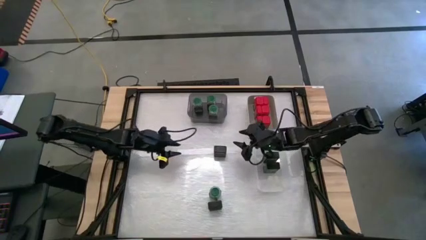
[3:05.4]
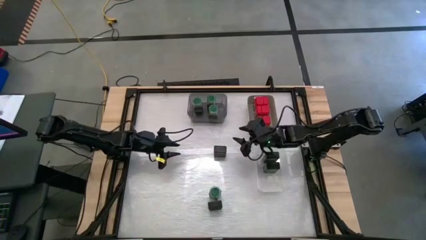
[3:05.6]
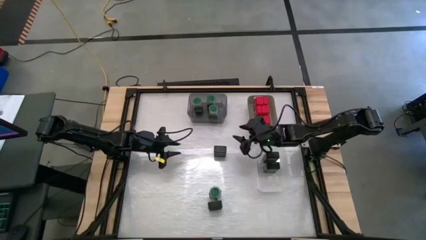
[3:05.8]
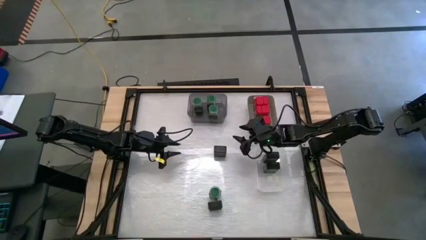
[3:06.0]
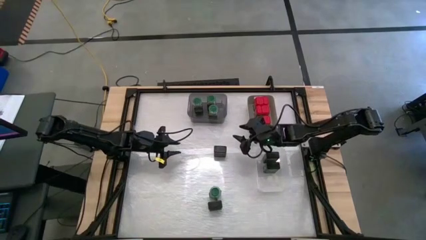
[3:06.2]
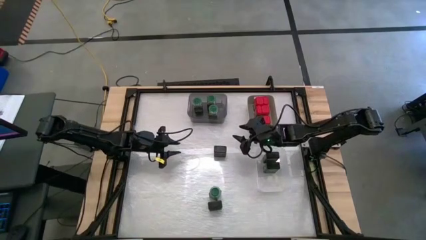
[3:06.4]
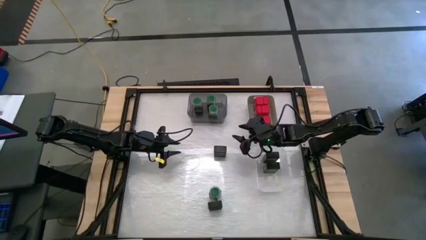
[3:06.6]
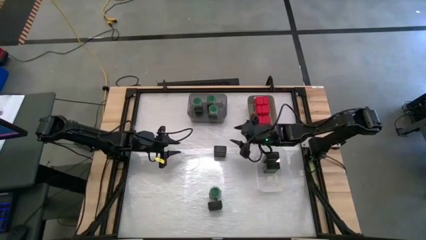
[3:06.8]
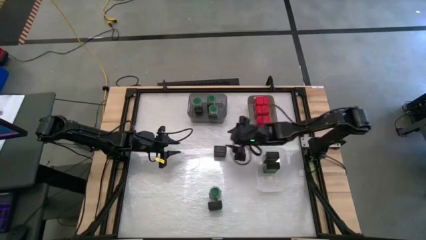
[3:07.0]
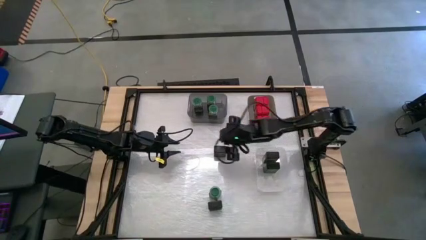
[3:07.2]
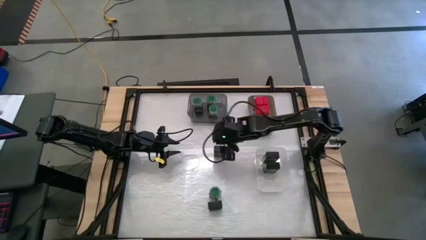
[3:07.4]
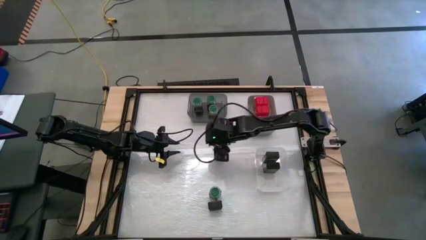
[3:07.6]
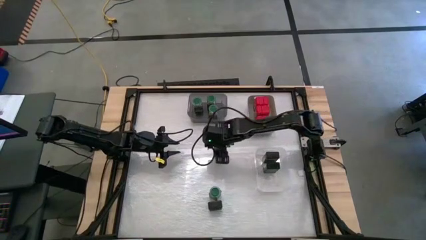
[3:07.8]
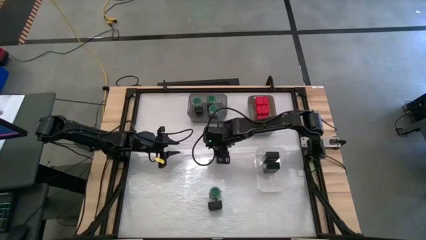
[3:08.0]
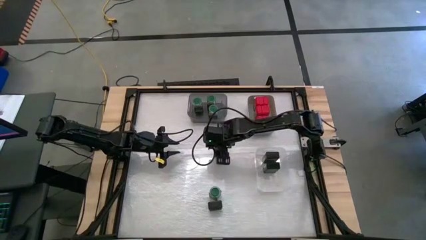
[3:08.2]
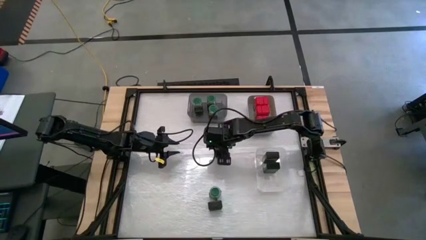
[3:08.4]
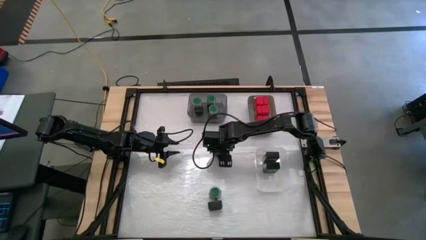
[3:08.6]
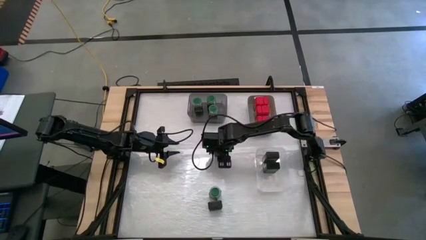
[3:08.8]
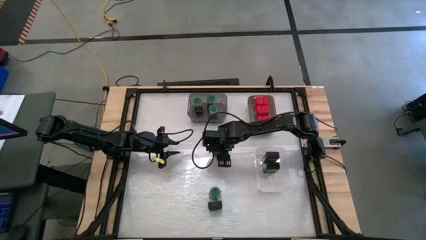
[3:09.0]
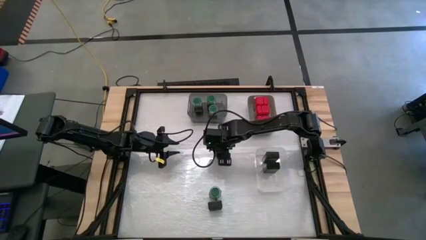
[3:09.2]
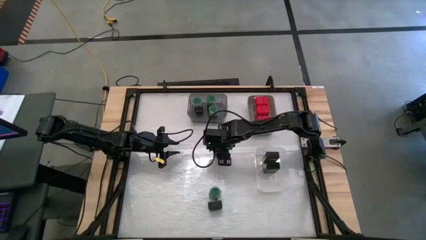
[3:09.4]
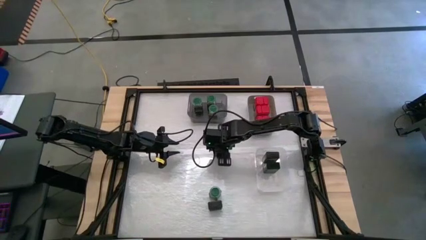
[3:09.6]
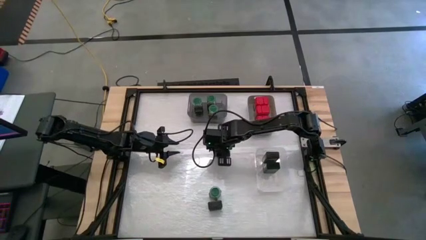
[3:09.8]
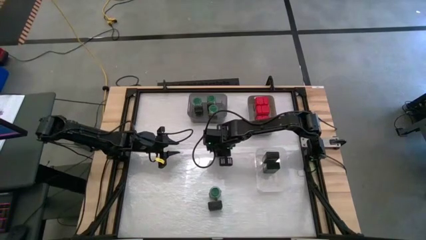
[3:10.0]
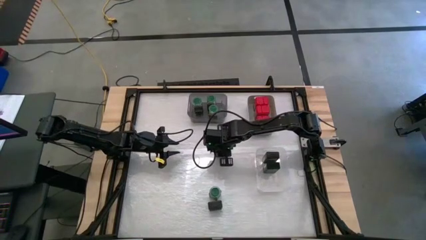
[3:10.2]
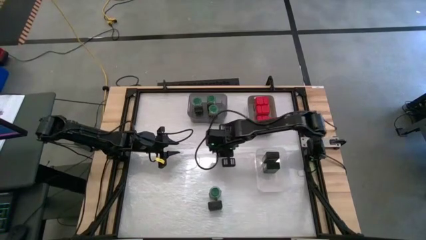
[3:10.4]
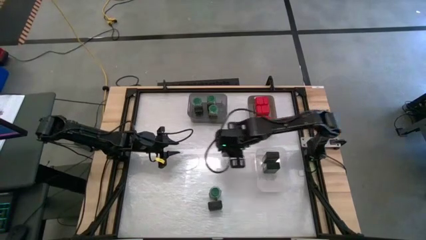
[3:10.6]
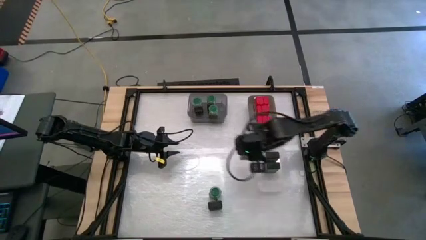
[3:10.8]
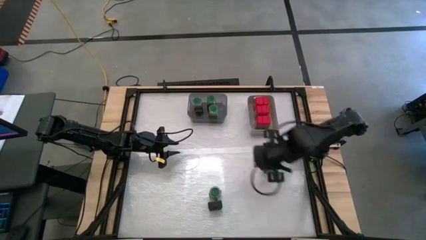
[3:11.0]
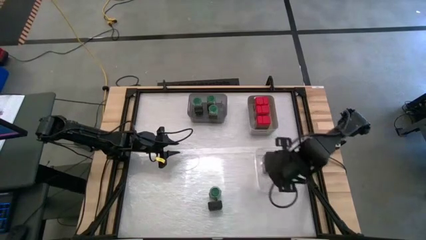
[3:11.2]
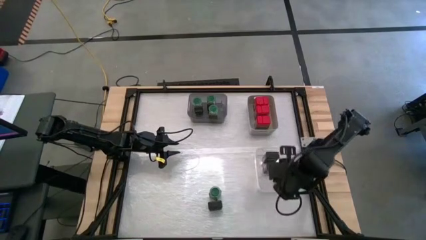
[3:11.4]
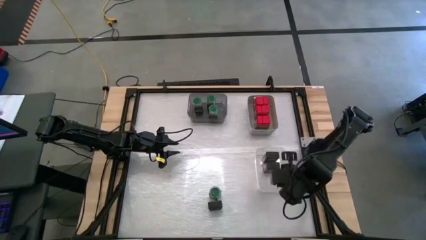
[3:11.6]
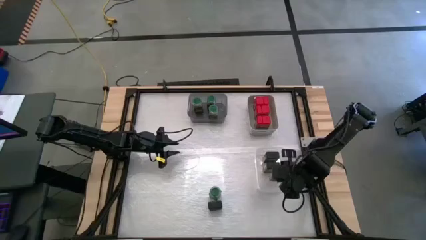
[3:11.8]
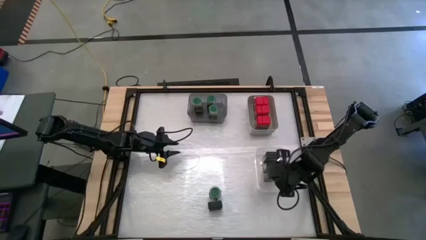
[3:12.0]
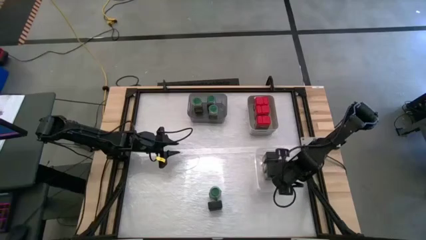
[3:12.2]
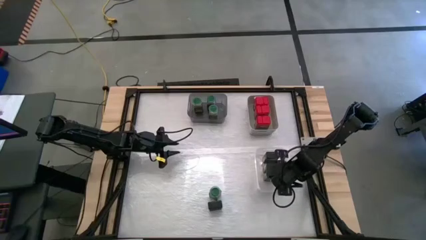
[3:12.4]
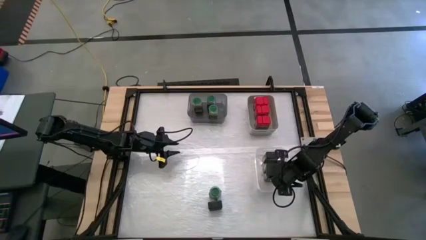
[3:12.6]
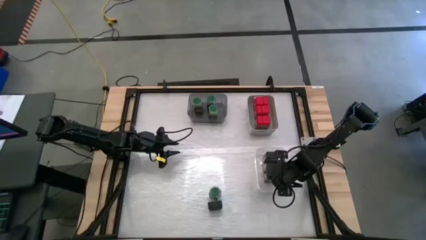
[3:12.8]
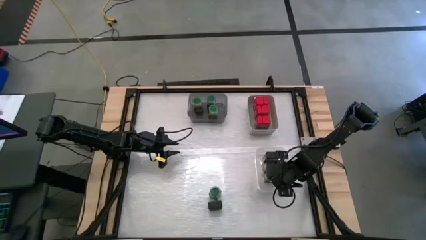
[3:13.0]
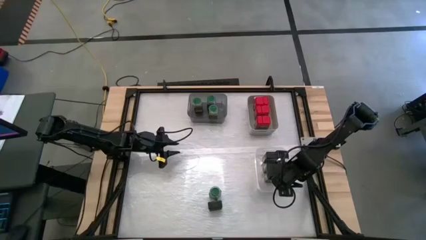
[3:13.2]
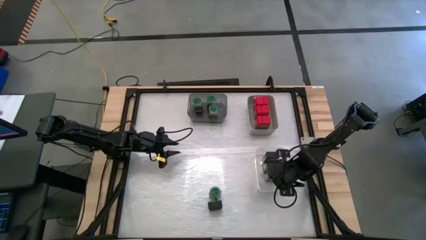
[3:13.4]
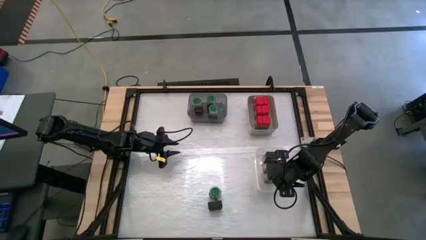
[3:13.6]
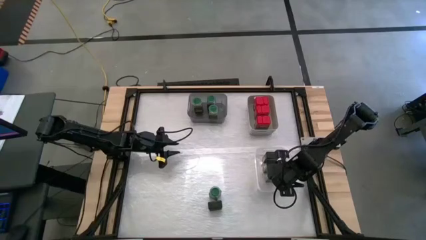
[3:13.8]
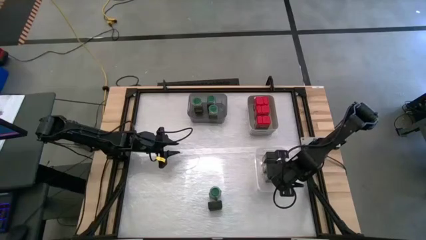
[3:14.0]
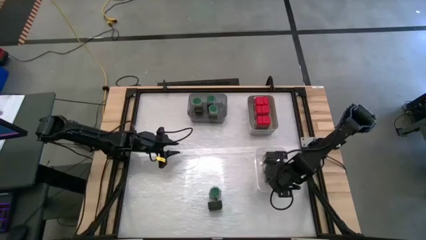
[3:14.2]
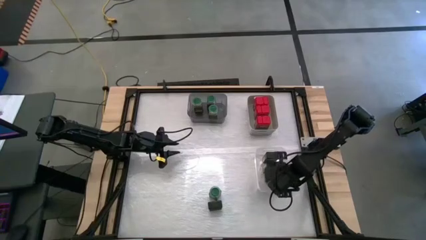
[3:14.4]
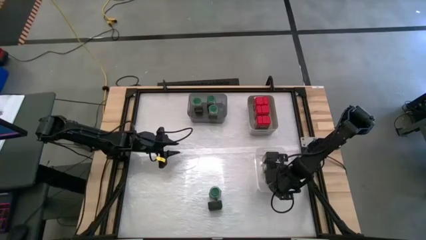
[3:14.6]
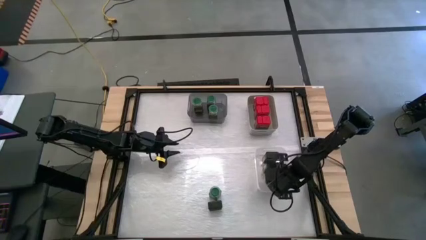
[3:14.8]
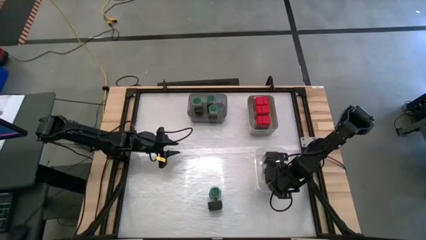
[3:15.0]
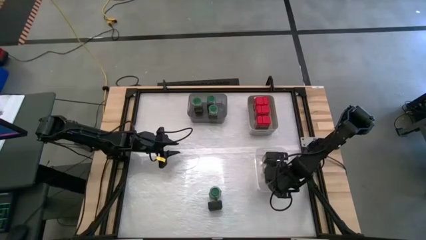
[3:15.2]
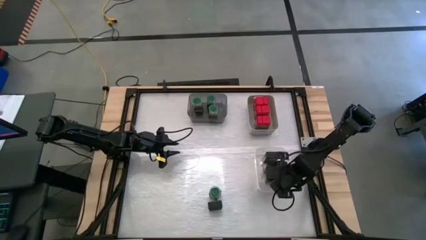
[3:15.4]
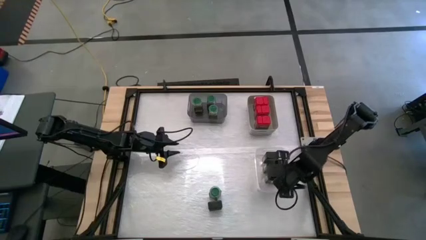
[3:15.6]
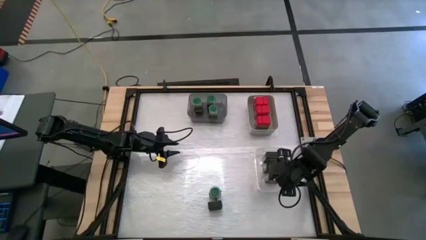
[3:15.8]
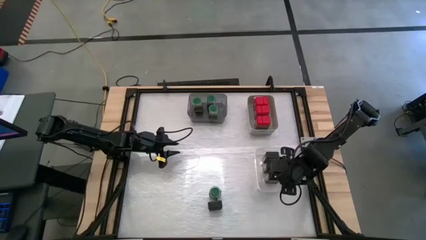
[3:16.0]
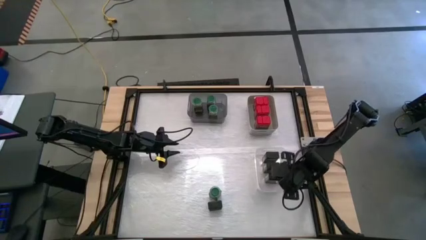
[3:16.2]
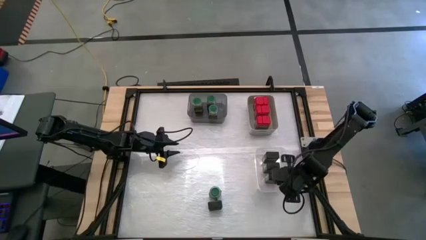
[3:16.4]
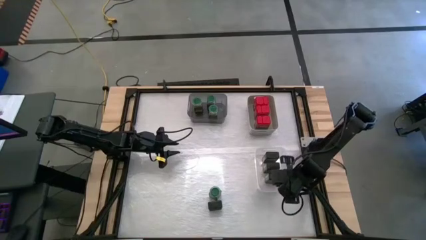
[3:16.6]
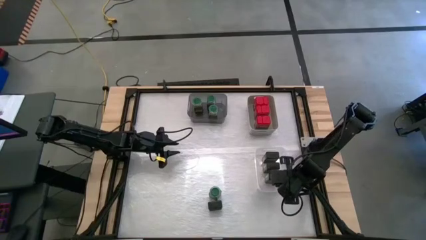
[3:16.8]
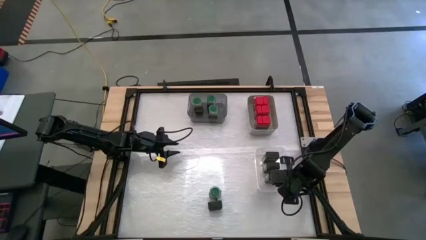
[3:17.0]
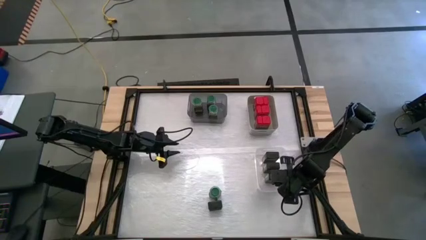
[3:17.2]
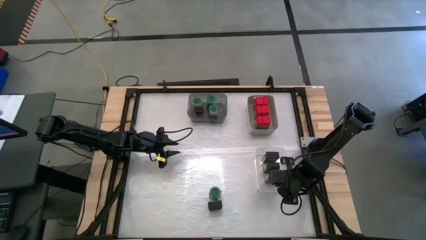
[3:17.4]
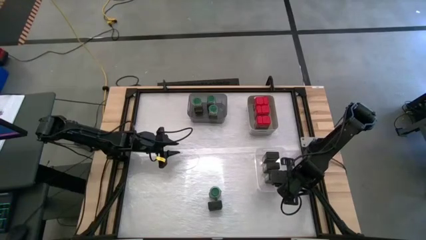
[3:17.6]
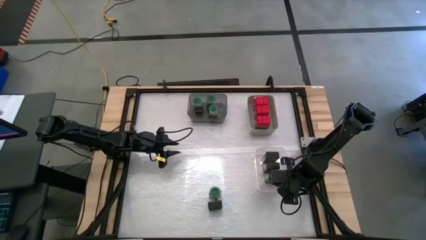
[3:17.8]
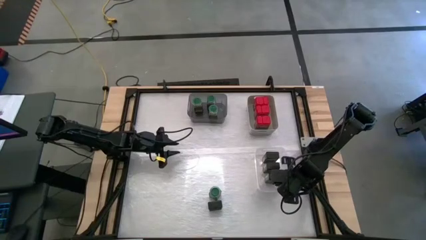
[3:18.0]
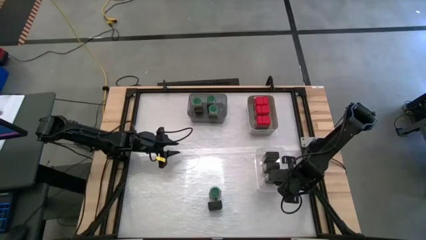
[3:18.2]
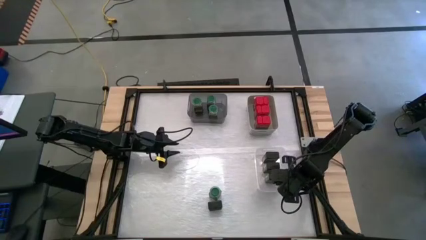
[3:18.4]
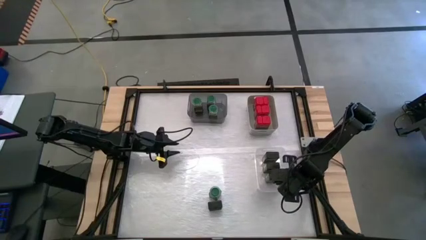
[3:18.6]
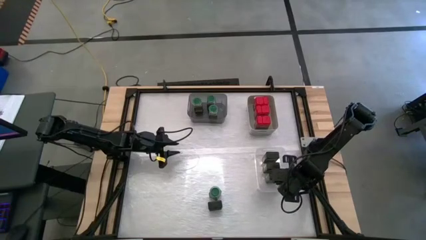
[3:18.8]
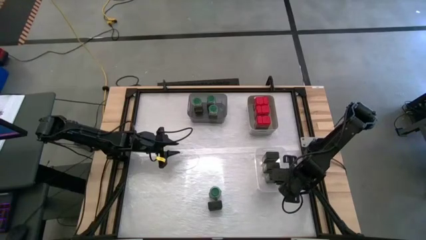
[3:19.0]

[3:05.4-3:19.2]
Task: Sort spices by type
Put the bottom left black seasoning can into the white transparent bin
